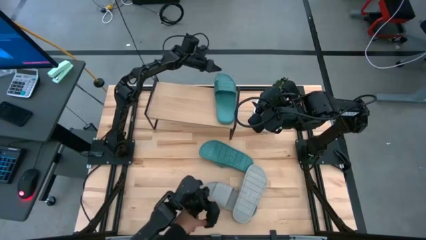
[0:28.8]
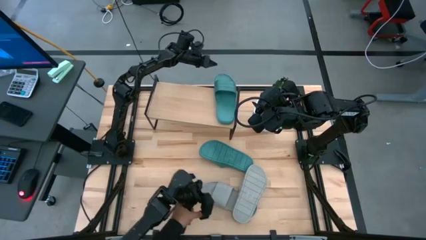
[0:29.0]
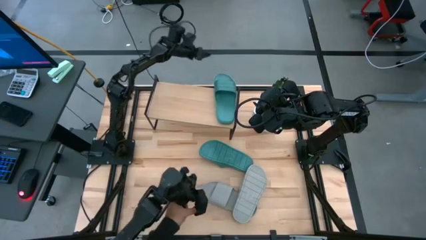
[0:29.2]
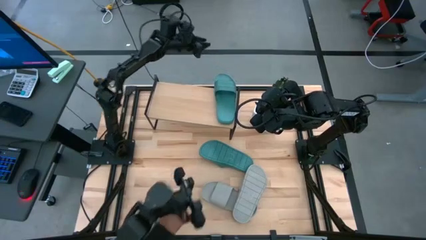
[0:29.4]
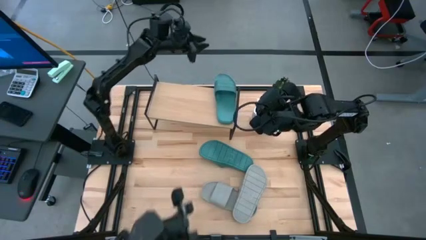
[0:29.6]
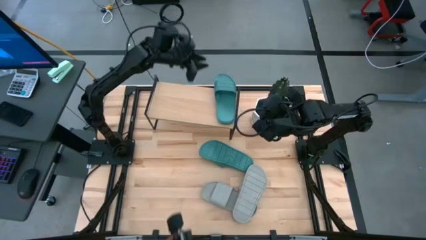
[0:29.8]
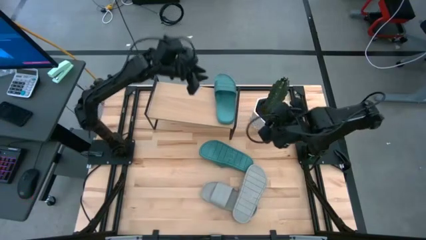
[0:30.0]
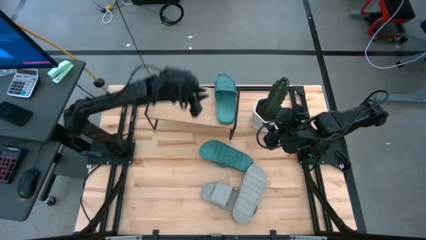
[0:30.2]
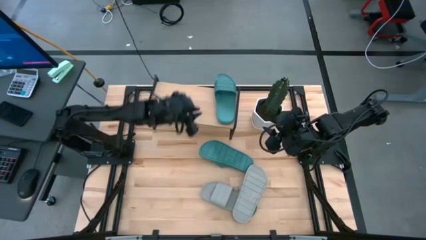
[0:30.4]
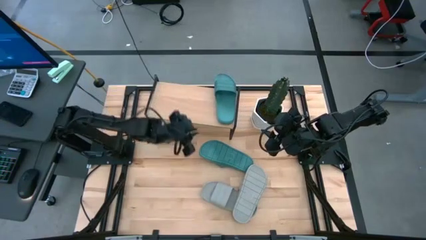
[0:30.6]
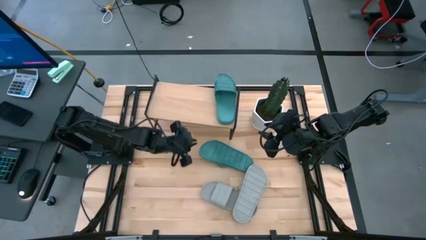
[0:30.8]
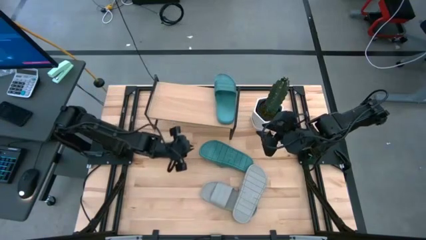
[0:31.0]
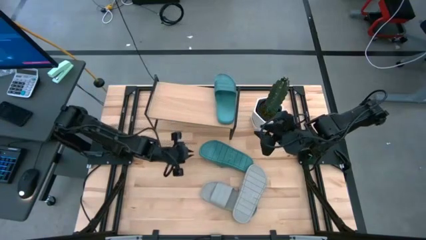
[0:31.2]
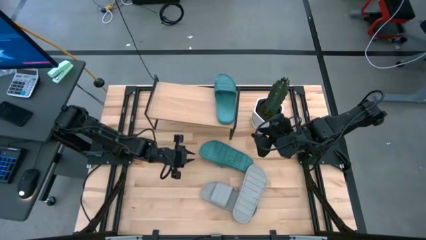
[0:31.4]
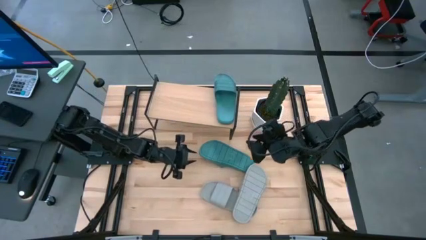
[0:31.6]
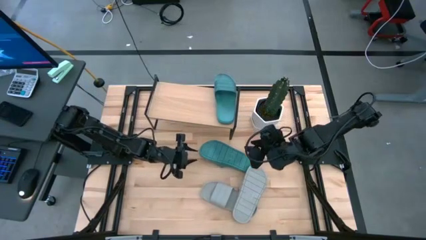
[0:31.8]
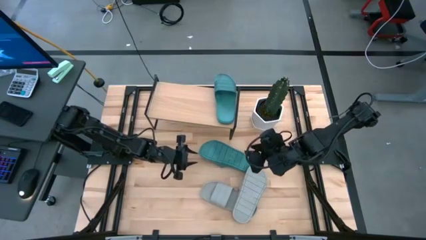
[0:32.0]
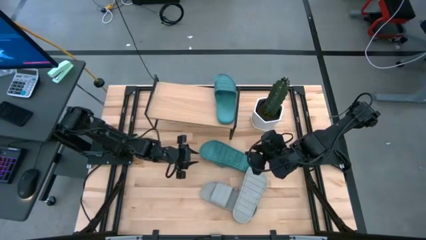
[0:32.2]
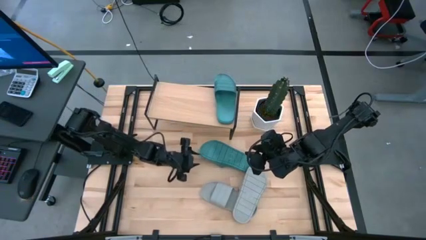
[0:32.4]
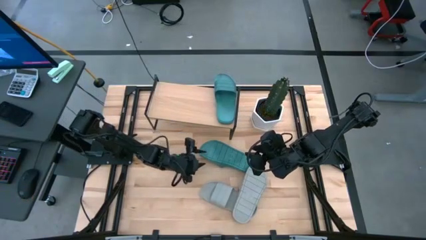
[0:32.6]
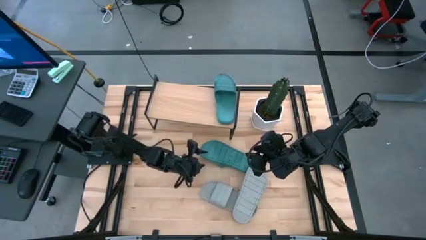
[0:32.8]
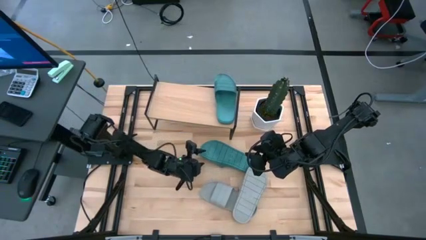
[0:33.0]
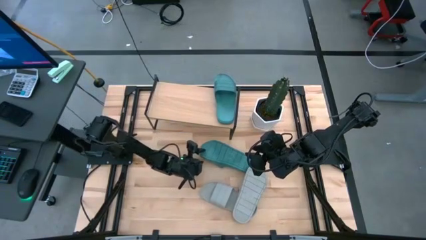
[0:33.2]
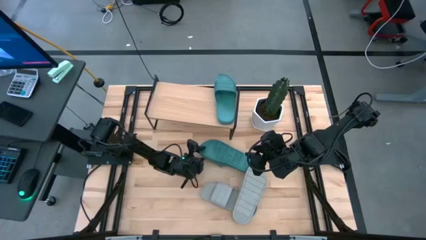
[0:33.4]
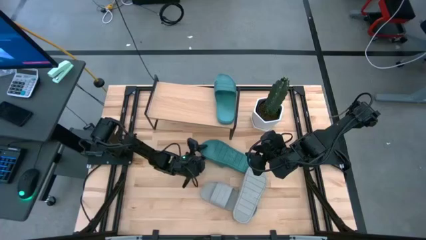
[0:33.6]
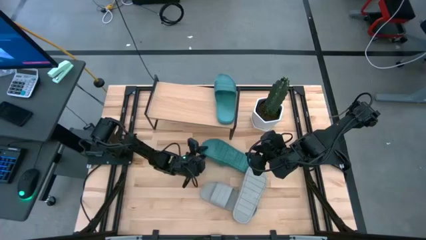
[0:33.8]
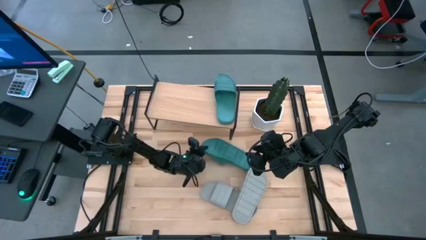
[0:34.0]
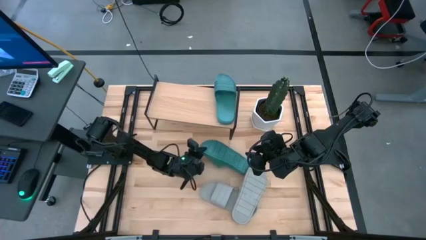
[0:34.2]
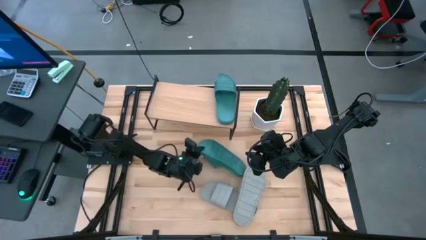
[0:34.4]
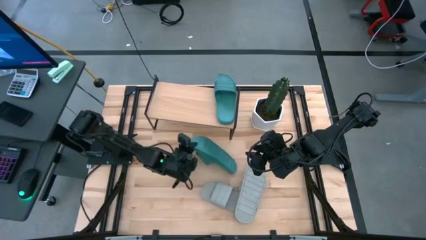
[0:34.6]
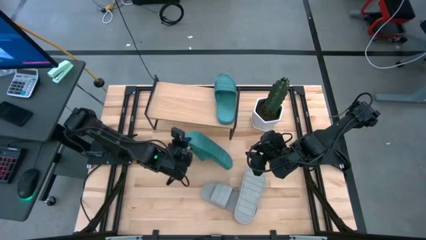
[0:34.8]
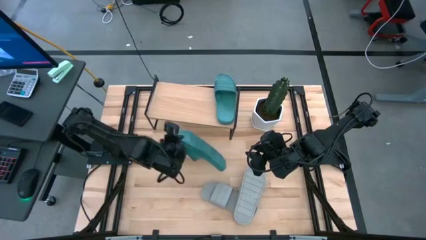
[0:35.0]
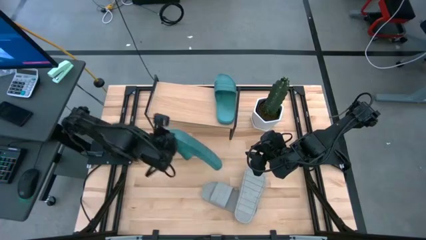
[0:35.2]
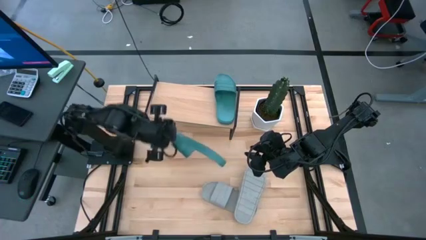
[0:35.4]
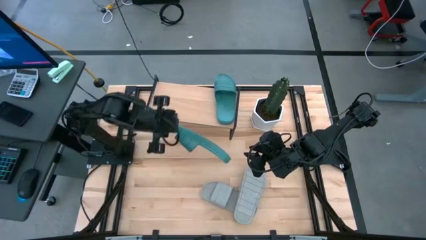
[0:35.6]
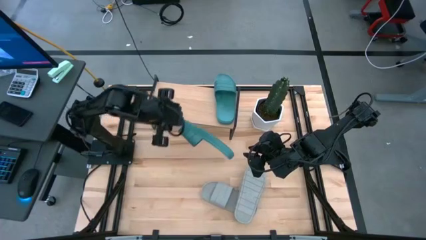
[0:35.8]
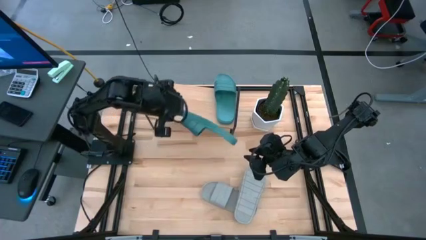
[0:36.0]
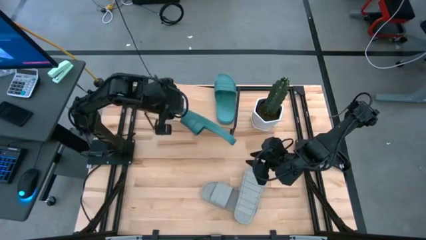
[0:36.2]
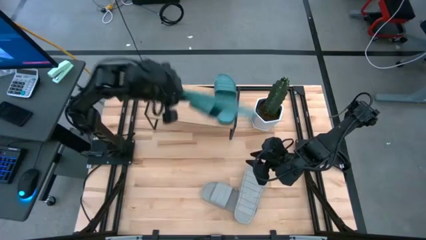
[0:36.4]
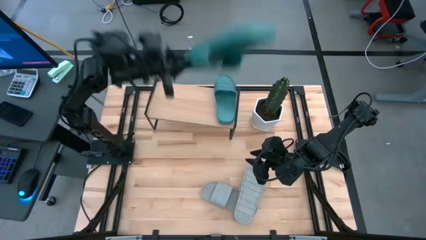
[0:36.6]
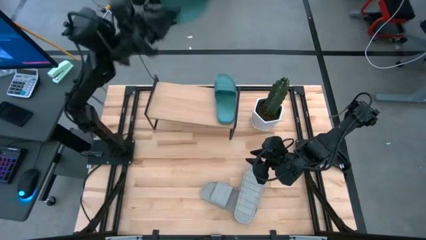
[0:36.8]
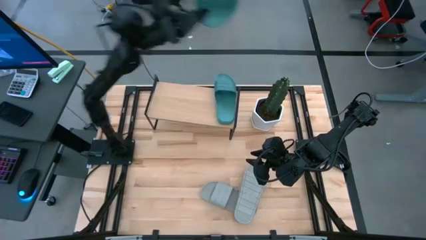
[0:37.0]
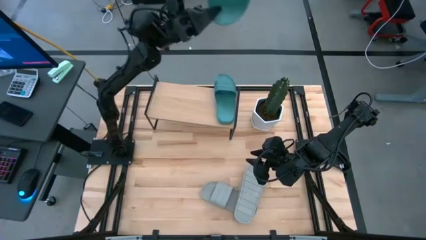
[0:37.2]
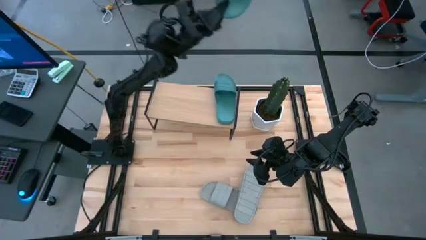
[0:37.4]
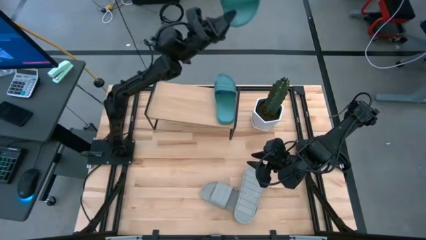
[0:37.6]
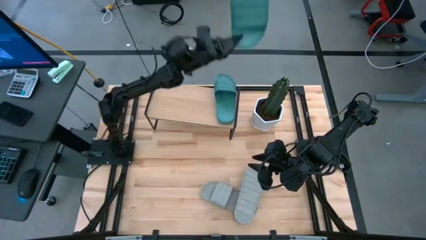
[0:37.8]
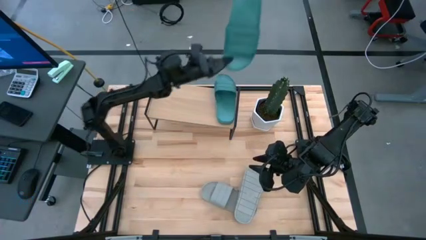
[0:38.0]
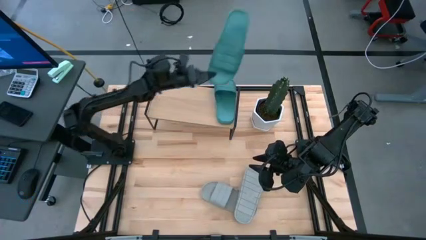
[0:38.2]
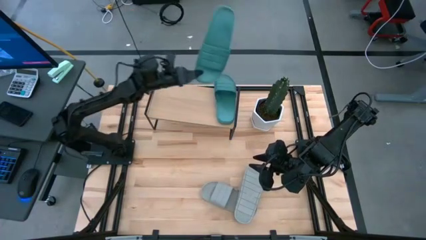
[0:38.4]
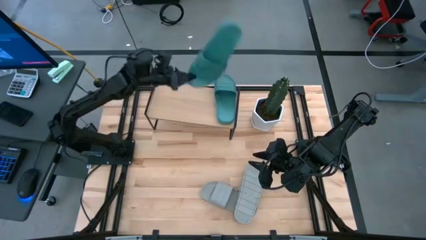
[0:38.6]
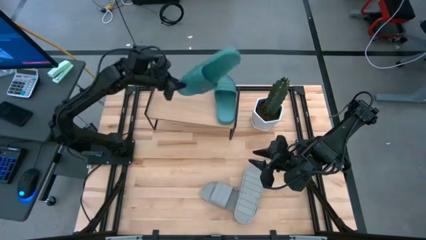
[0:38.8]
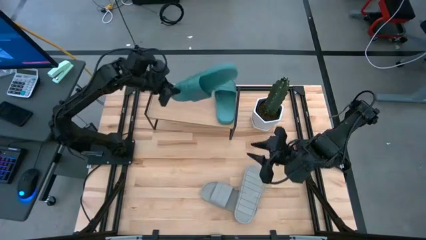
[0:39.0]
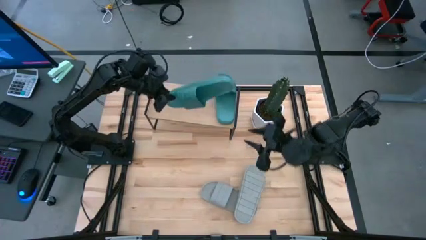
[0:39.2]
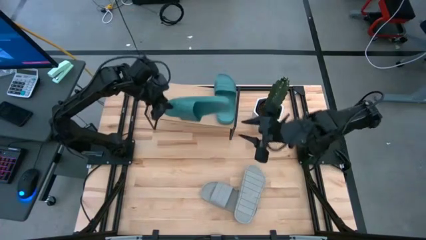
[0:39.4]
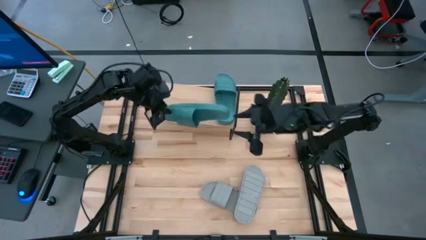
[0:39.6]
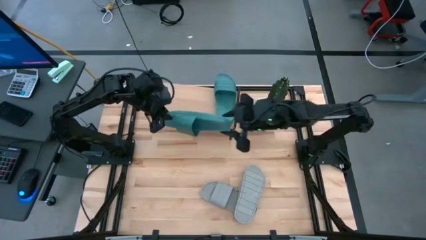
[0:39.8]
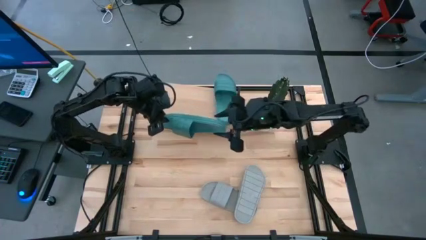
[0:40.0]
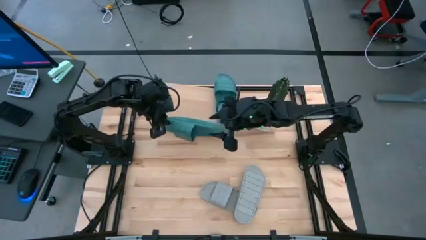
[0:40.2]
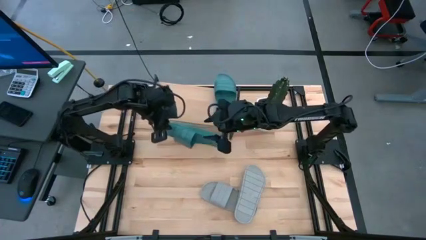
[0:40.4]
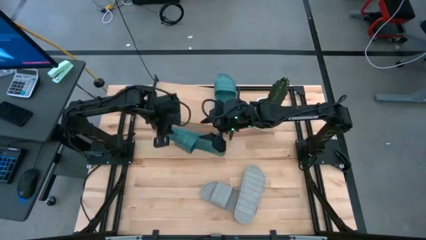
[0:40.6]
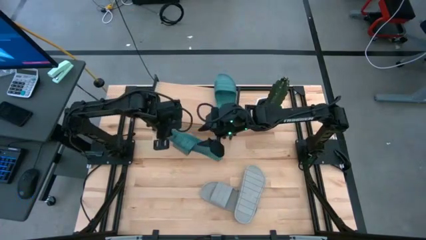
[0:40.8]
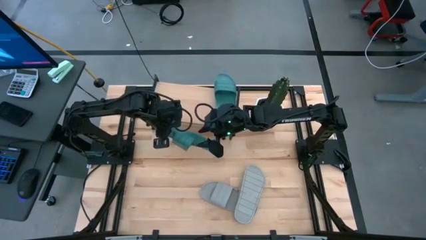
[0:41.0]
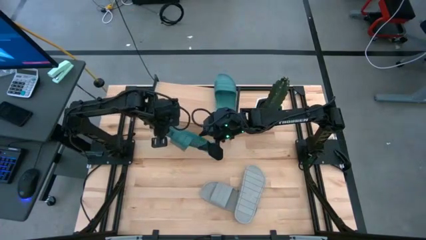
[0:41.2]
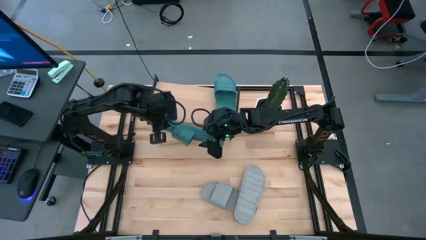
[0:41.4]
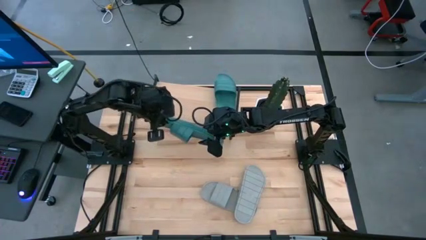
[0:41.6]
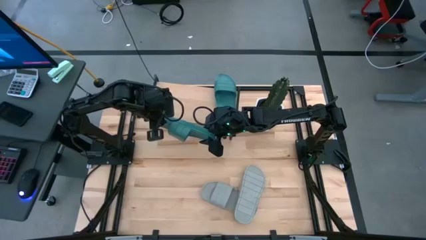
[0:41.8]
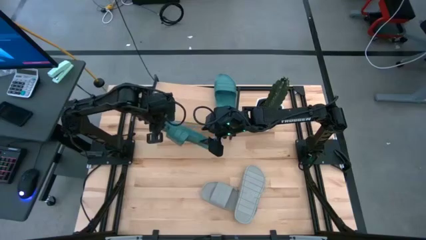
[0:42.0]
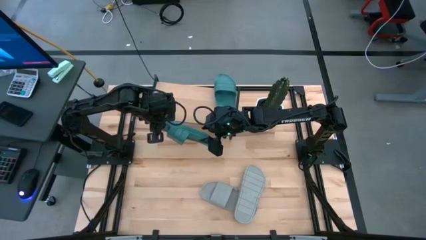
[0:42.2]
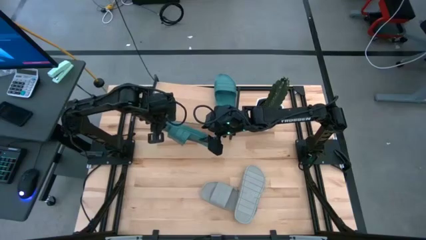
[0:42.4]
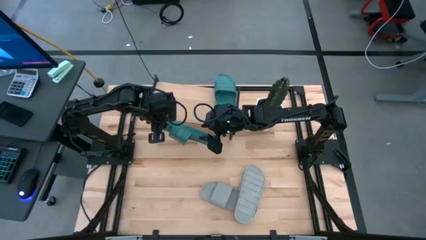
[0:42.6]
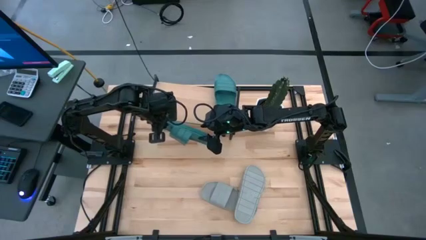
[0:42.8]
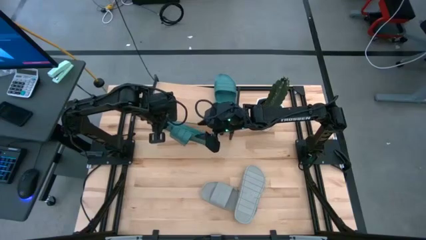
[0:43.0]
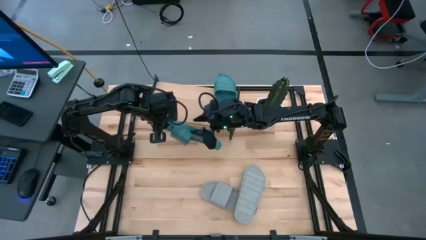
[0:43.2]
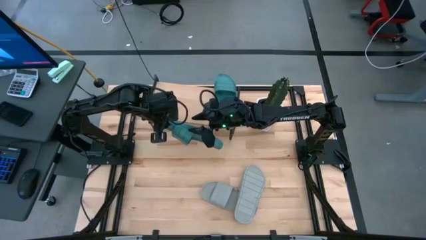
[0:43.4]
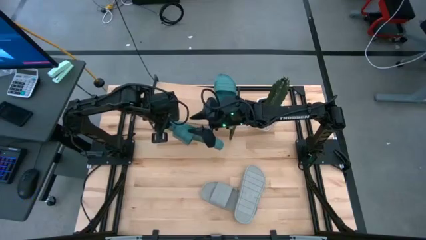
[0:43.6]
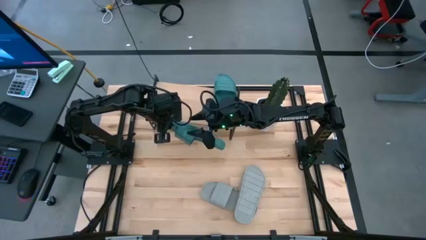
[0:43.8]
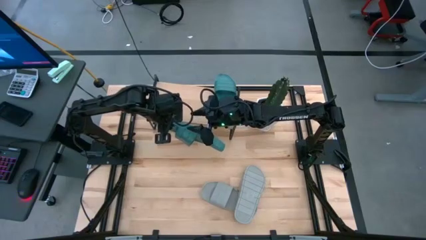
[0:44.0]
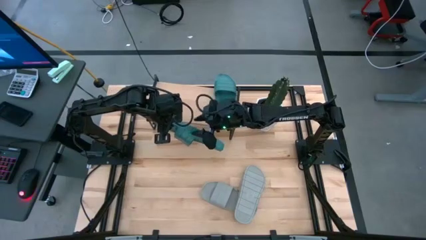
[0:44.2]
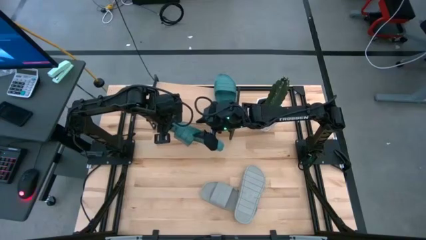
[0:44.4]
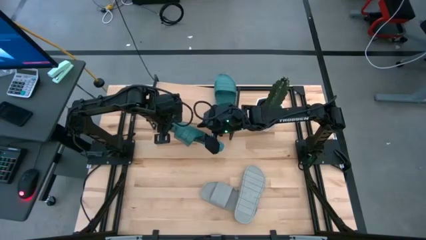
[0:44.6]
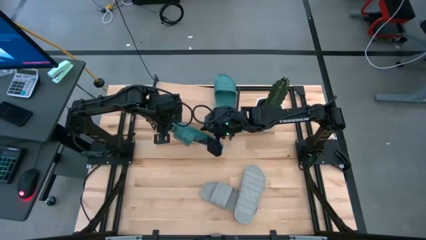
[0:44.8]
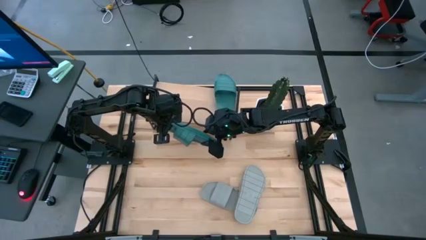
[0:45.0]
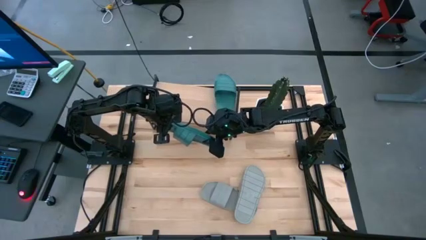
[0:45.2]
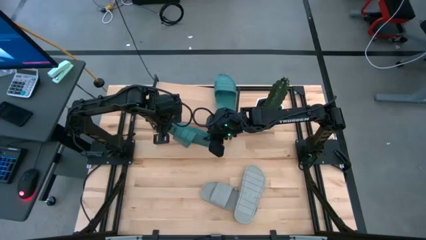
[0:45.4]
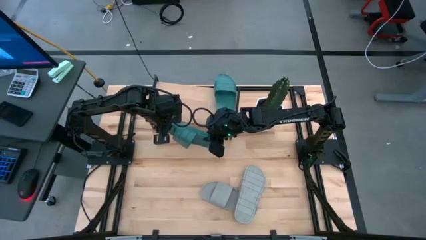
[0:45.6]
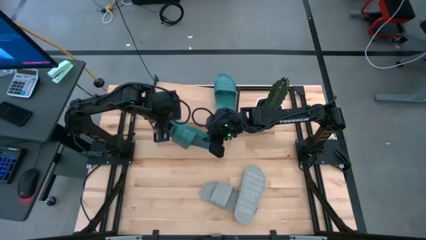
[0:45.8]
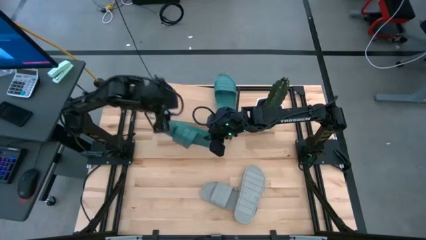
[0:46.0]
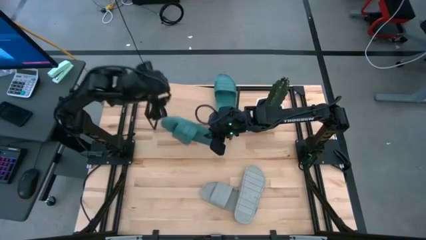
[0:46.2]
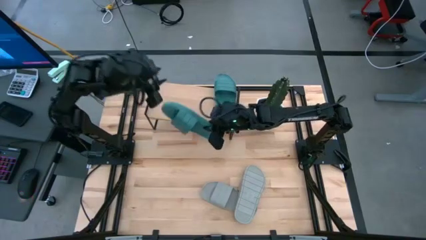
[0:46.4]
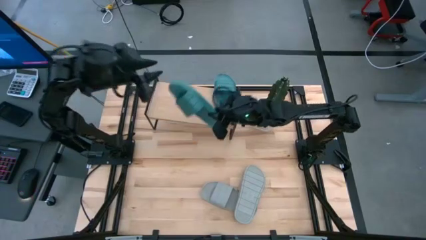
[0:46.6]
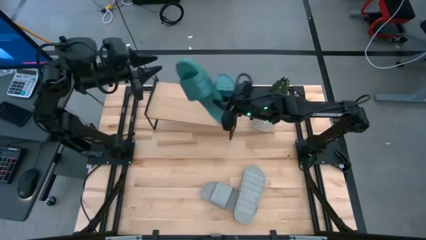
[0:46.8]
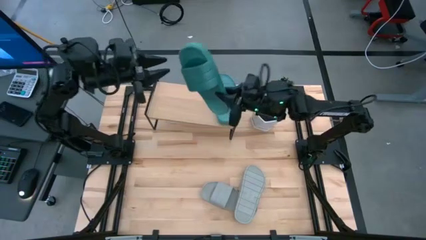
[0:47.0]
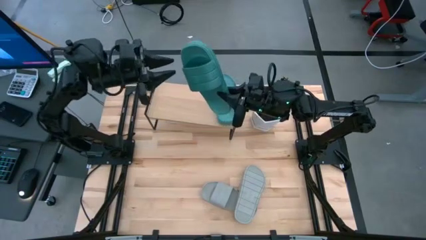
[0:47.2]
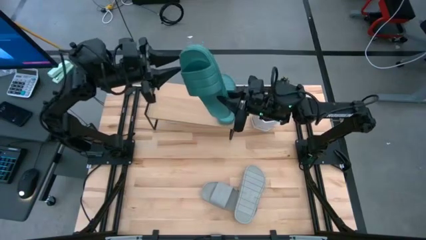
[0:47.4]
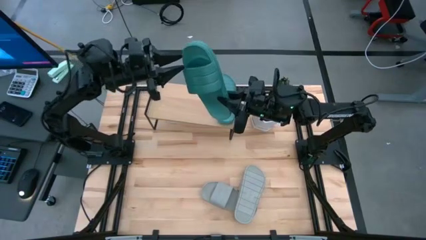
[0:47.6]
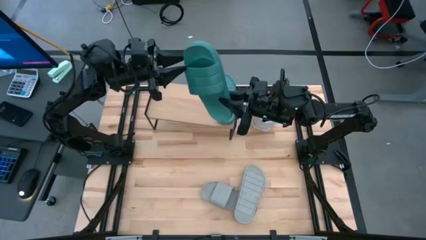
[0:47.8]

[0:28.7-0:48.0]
Task: Pick and place slides into the shelf
Put the green slide on the shelf
